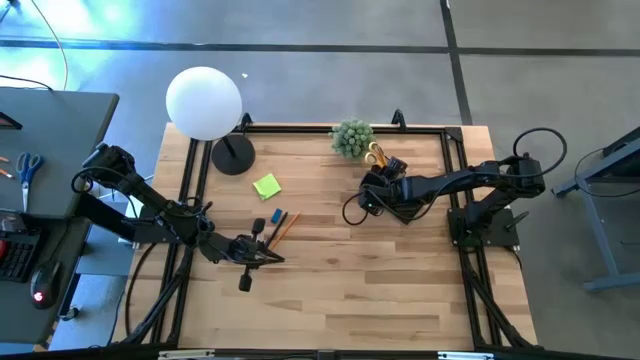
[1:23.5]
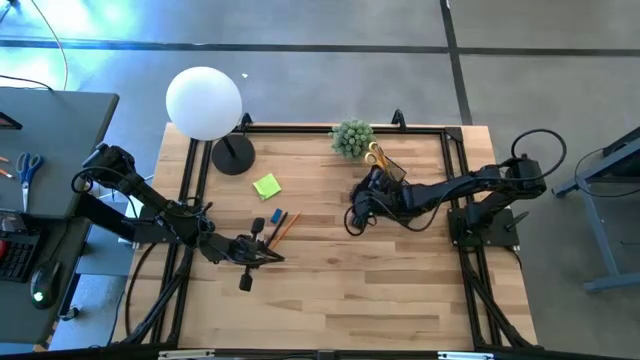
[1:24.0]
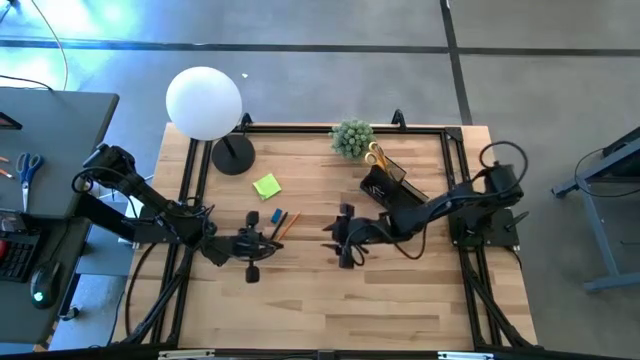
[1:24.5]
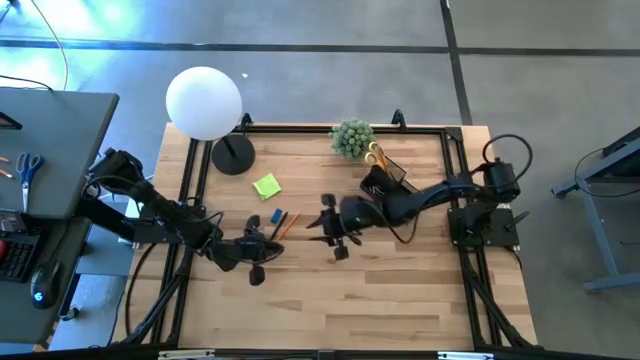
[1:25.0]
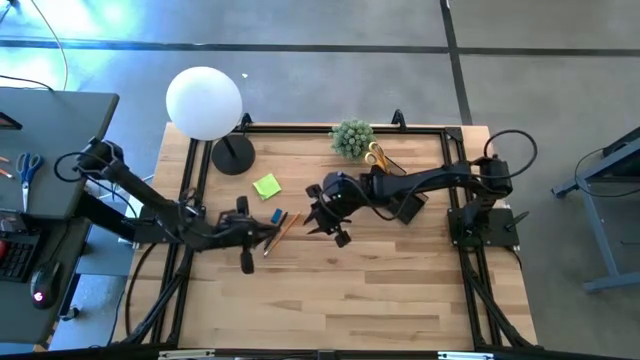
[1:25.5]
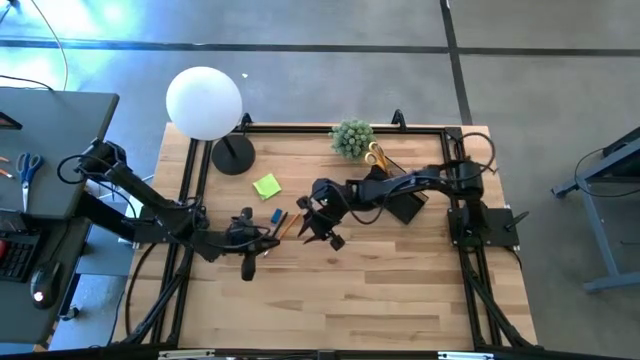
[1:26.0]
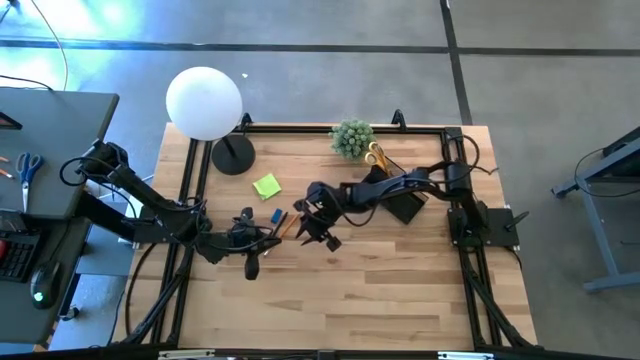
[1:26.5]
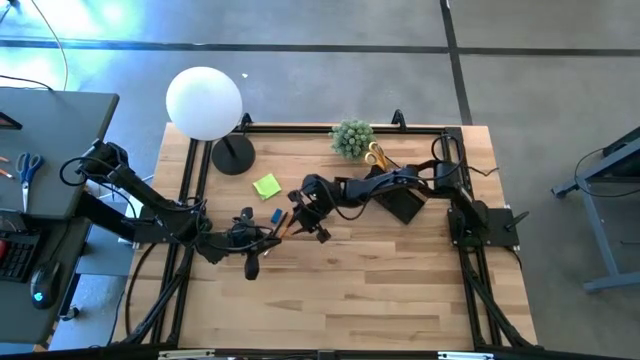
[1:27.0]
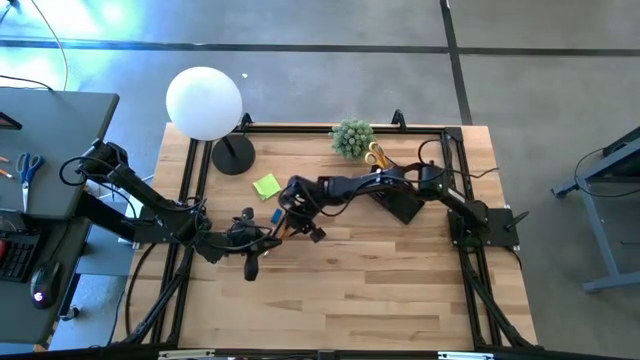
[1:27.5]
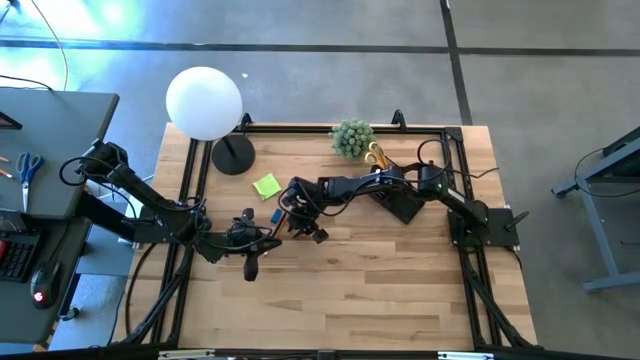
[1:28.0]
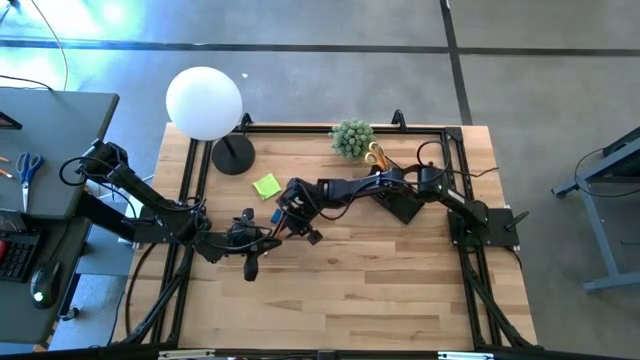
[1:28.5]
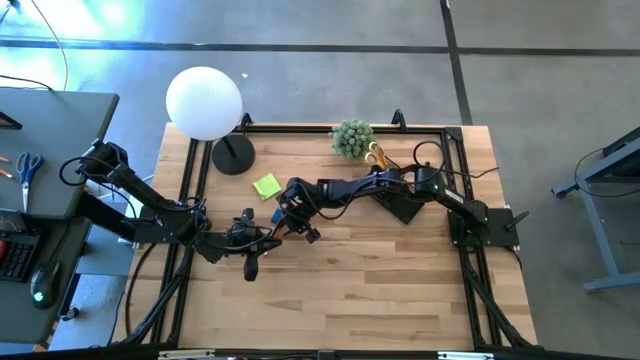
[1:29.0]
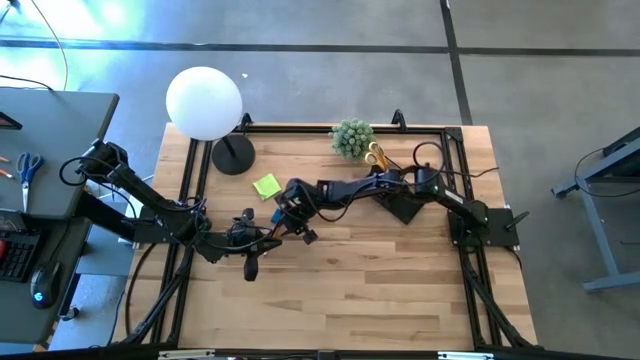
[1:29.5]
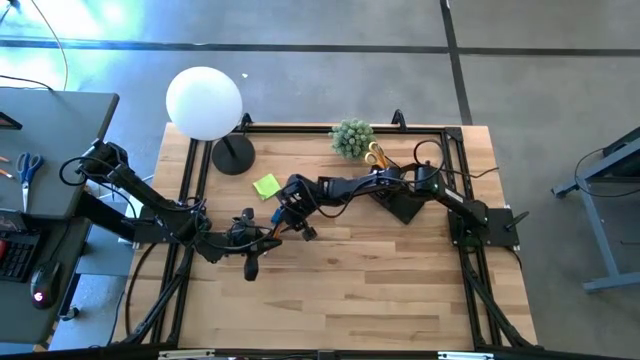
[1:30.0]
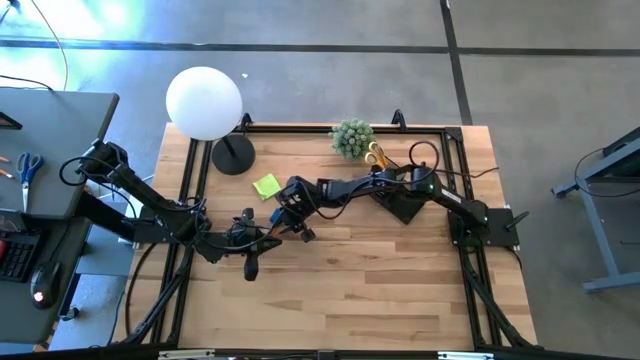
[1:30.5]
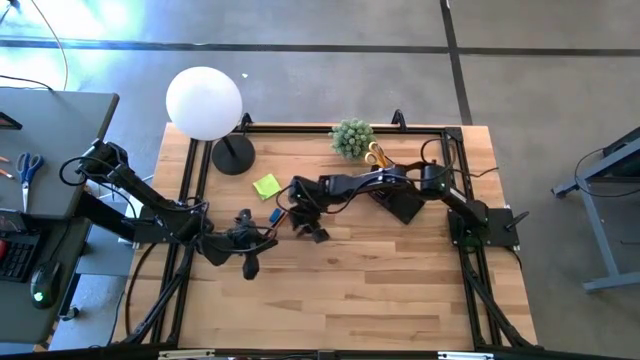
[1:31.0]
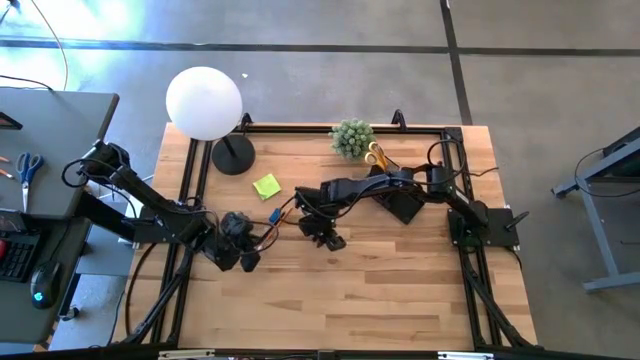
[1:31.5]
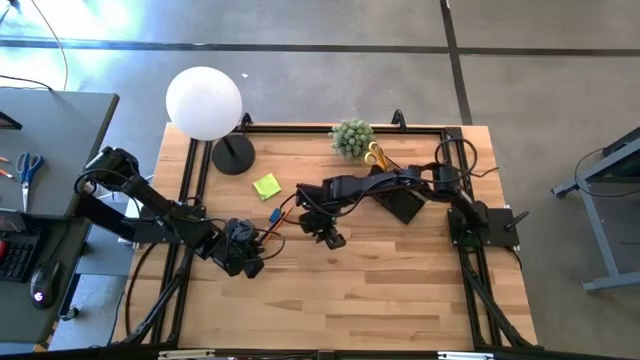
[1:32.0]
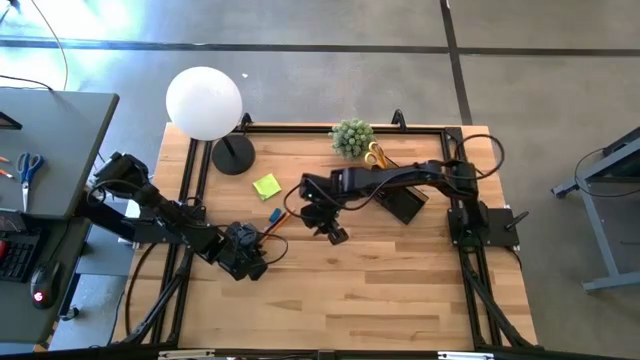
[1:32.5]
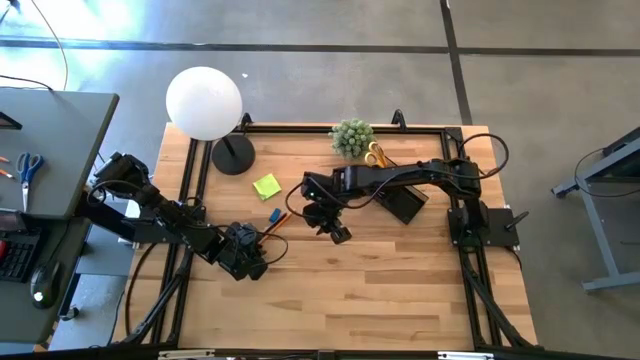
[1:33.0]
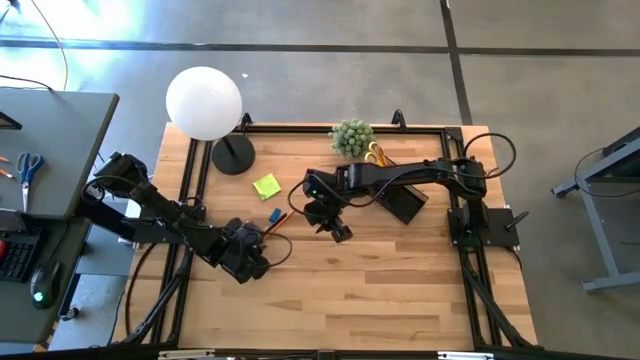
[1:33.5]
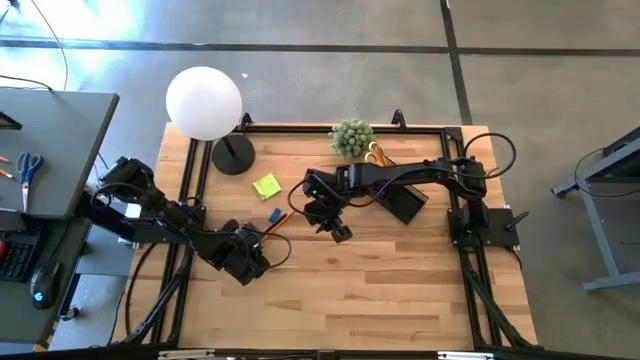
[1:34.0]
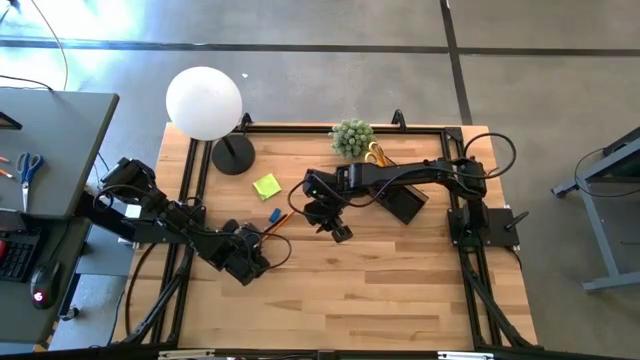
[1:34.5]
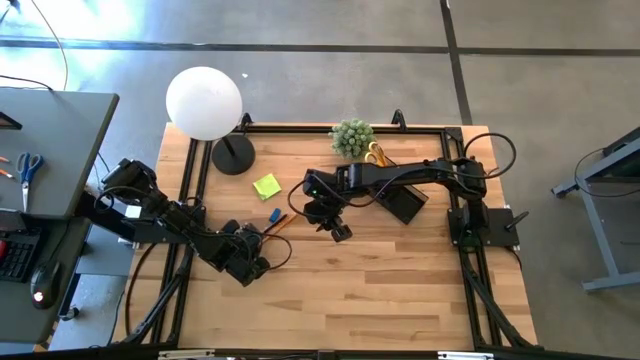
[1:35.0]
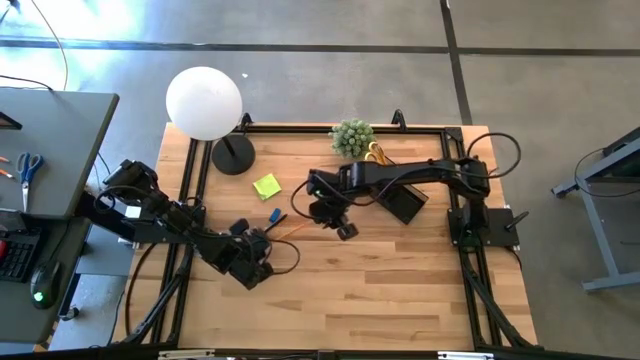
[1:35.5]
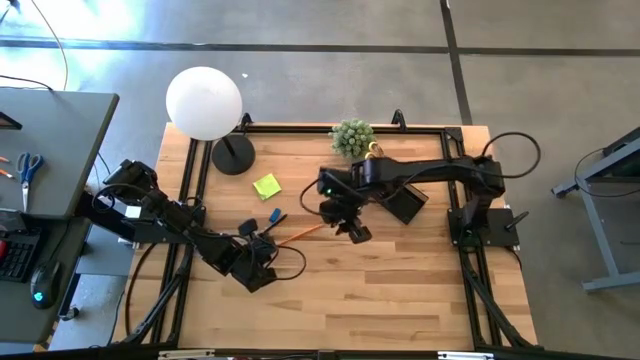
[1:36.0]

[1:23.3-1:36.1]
Task: Pick and place office supplies into organizer
Put the orange pencil into the desk organizer

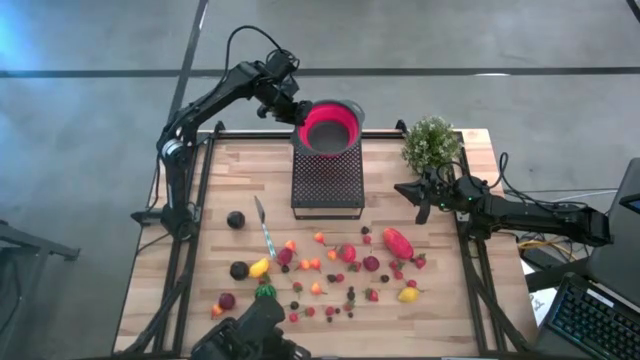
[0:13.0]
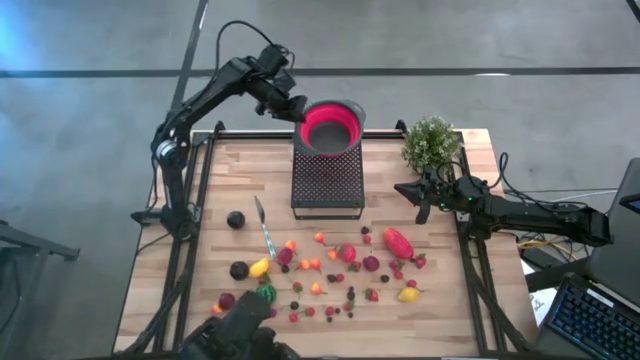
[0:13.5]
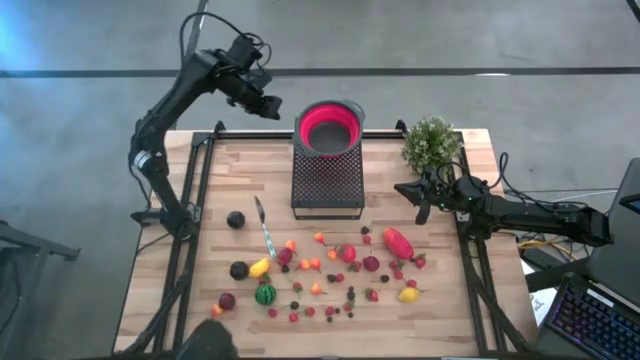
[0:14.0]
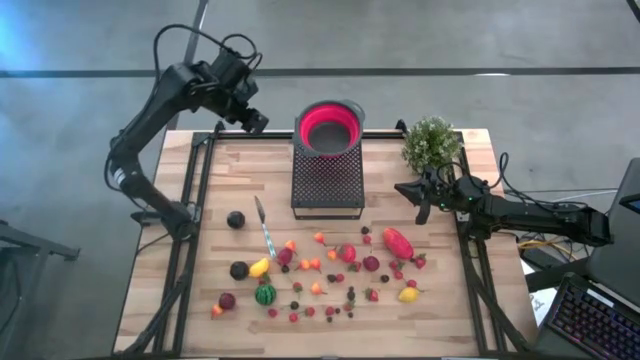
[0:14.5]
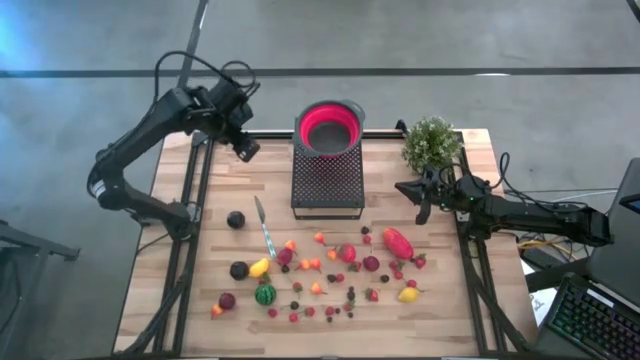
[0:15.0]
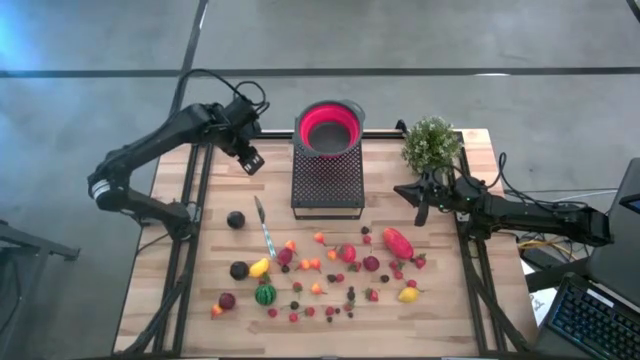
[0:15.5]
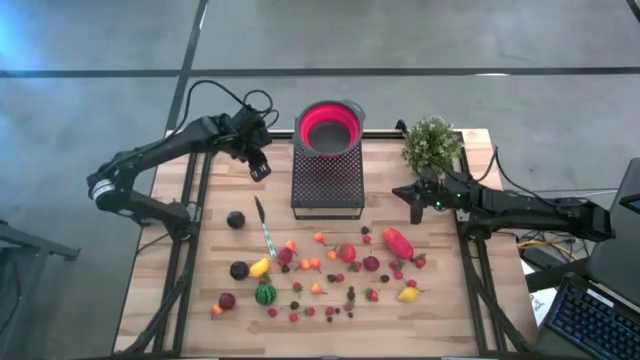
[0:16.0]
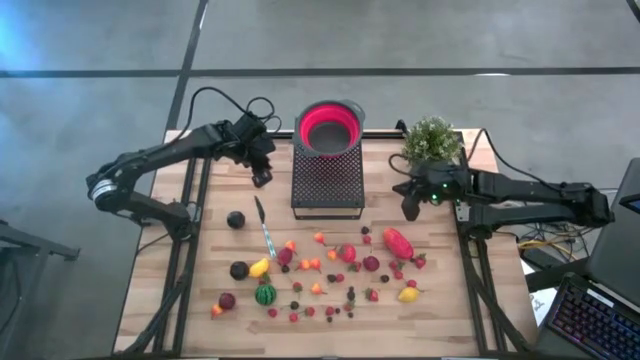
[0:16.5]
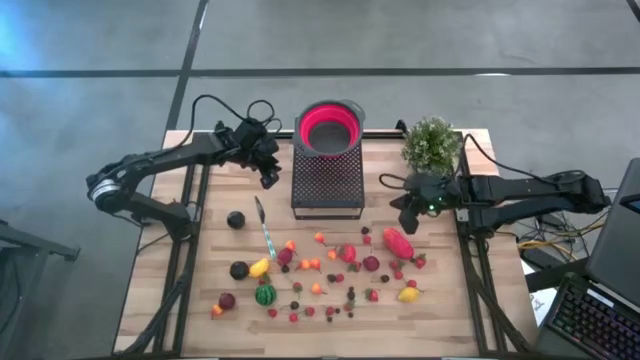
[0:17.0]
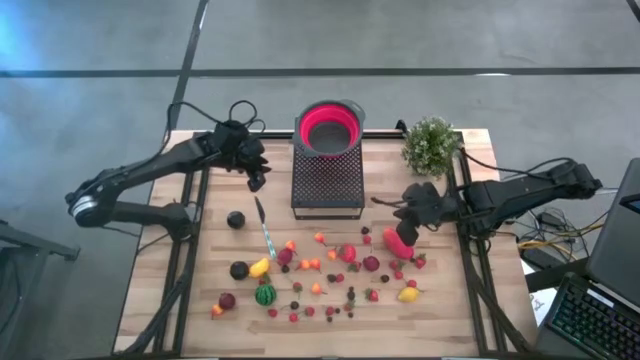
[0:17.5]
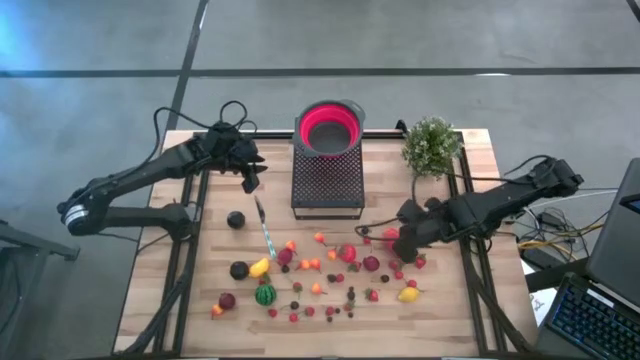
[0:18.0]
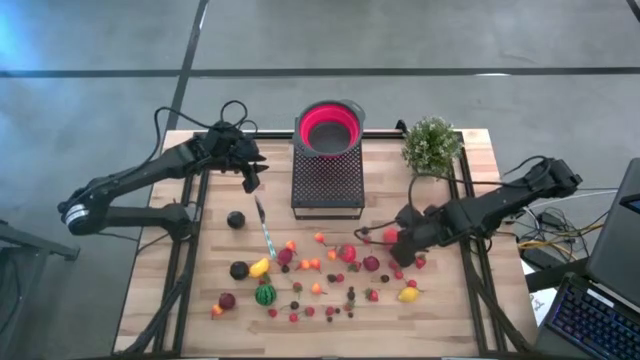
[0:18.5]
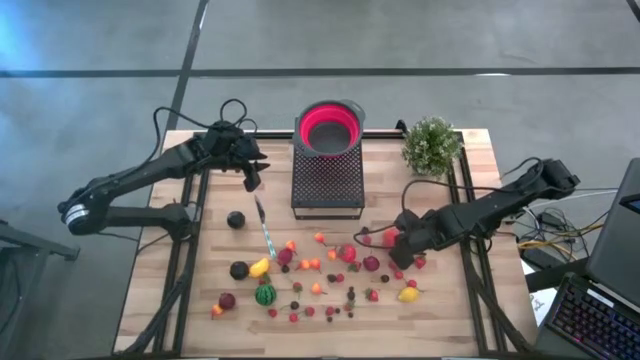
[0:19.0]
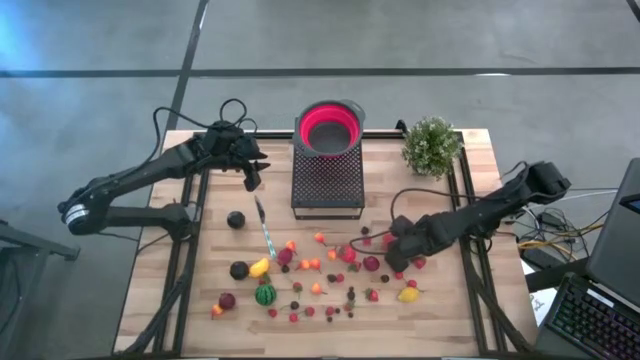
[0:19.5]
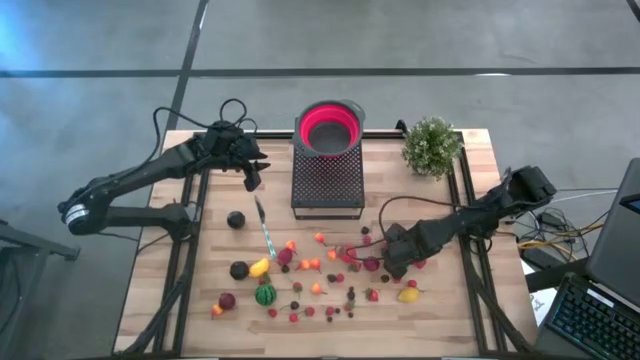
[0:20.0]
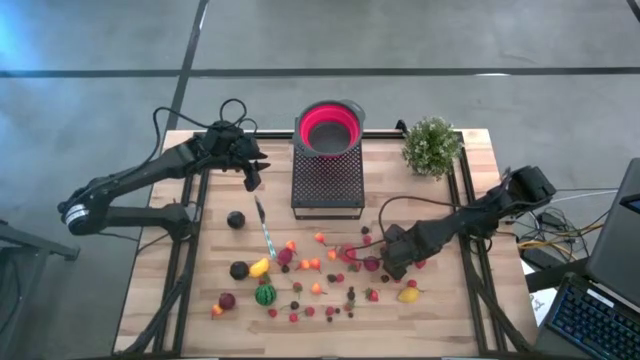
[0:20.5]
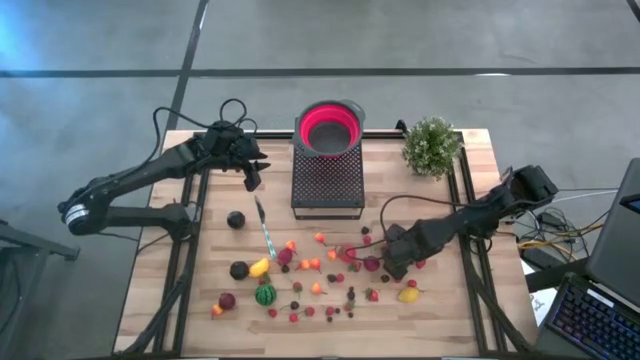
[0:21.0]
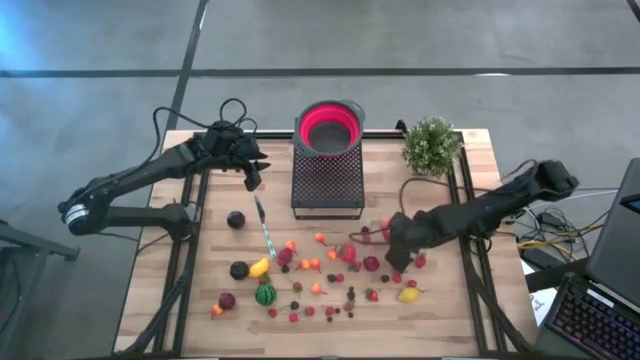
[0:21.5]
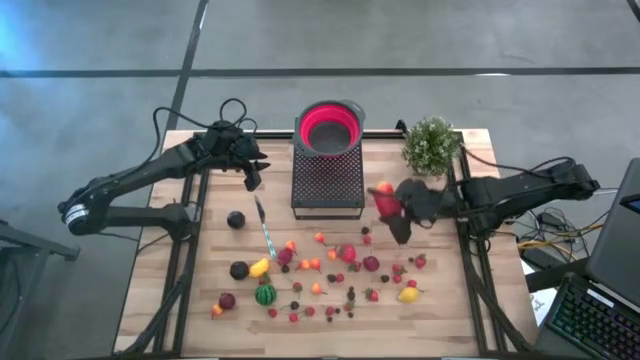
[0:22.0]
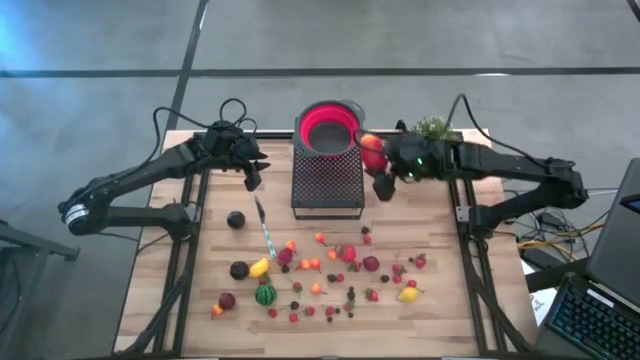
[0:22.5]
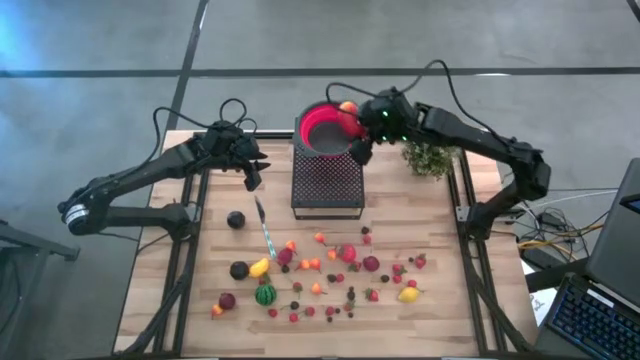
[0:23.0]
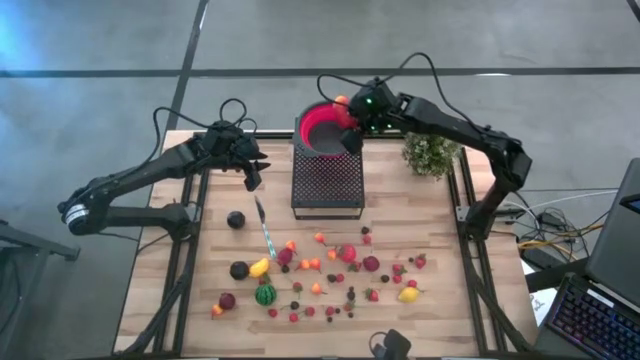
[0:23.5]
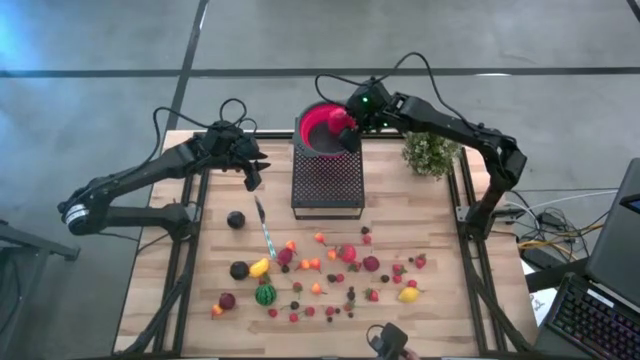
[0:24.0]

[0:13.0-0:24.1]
Task: Pick & Place Fruit
Put the red mango into the strainer bowl on the shelf
